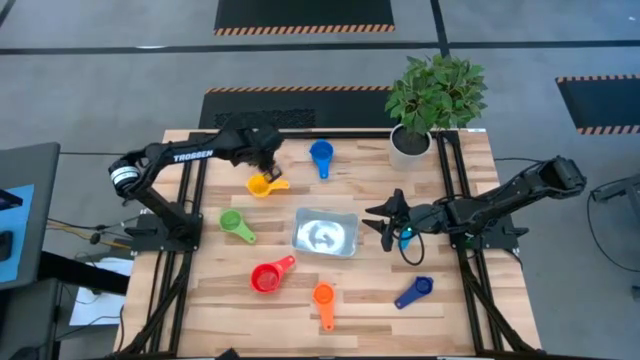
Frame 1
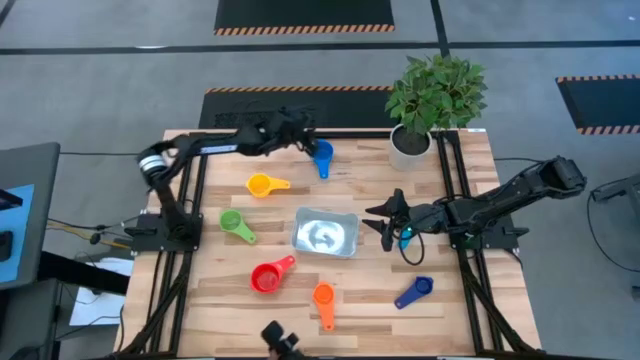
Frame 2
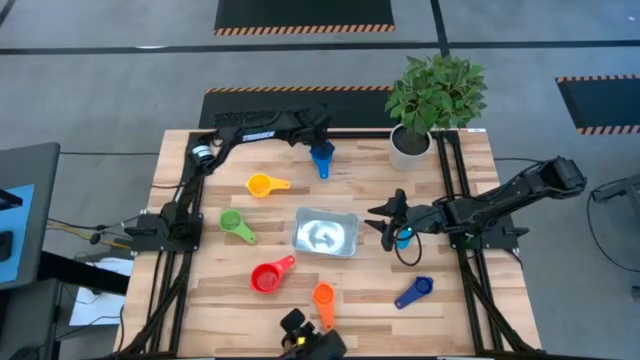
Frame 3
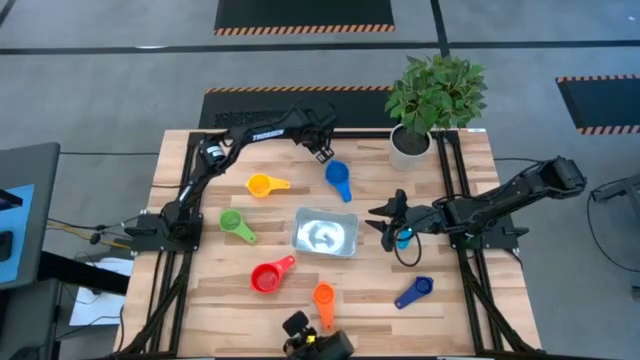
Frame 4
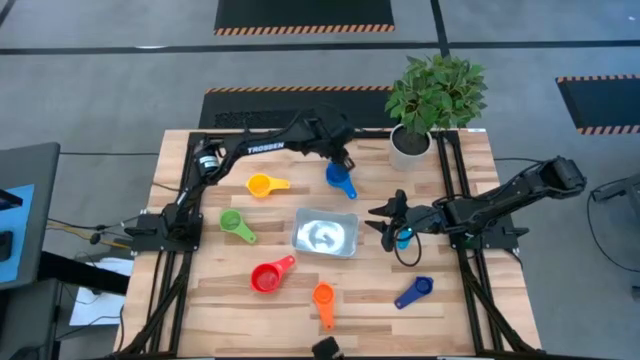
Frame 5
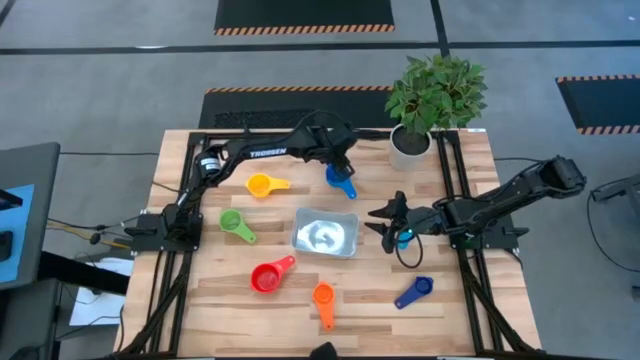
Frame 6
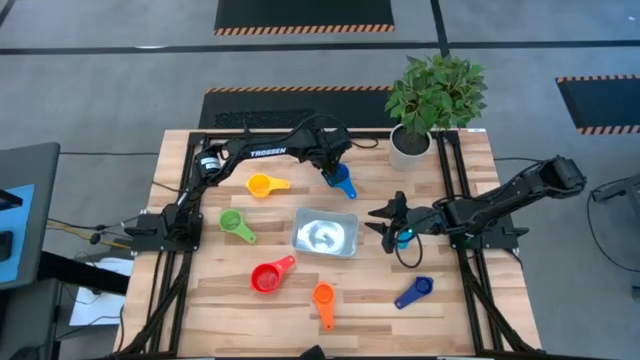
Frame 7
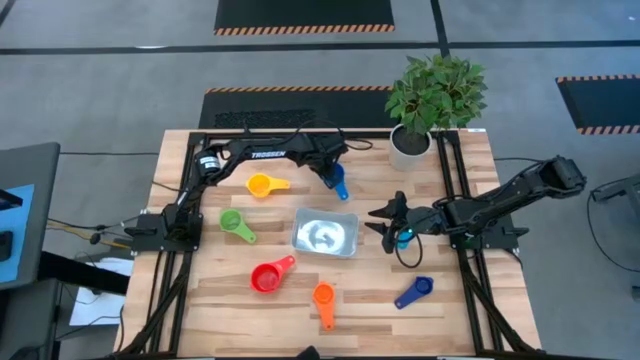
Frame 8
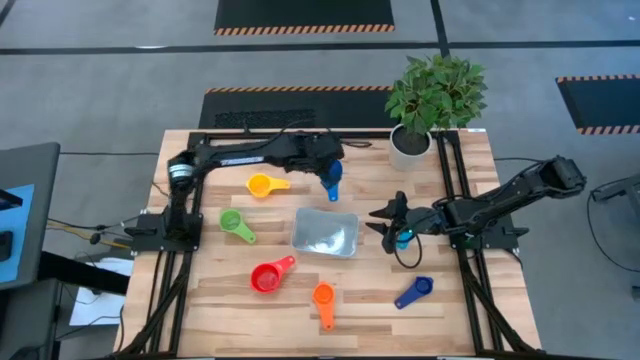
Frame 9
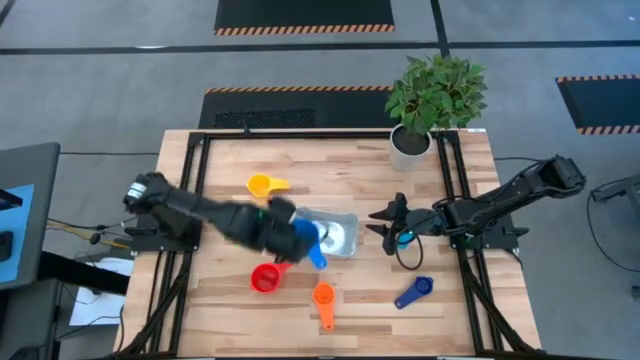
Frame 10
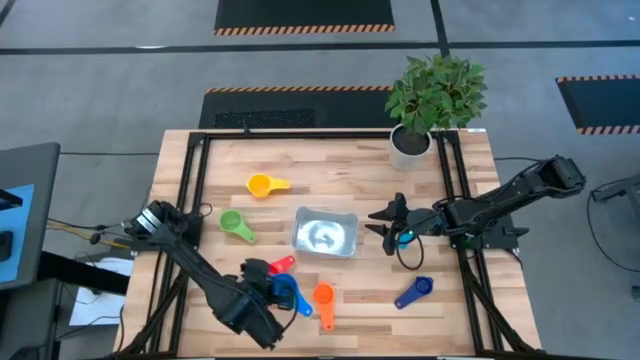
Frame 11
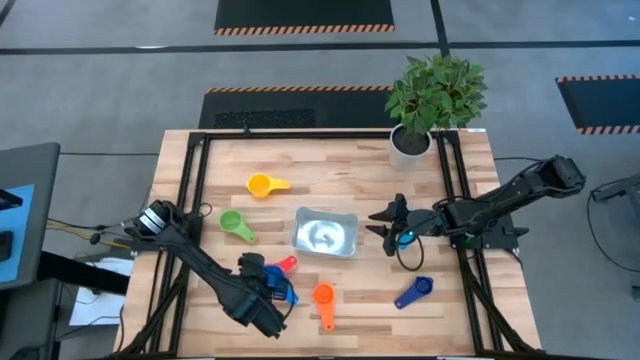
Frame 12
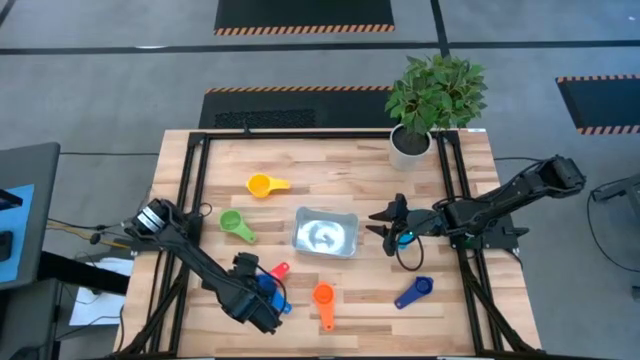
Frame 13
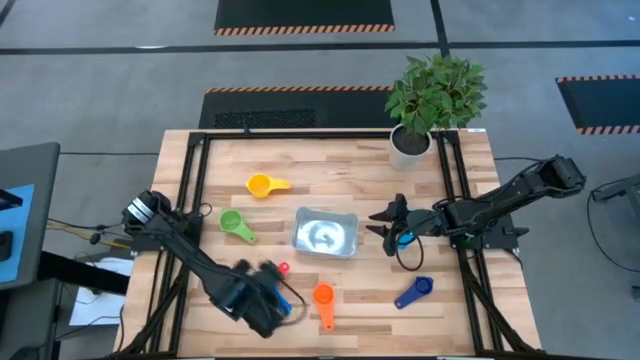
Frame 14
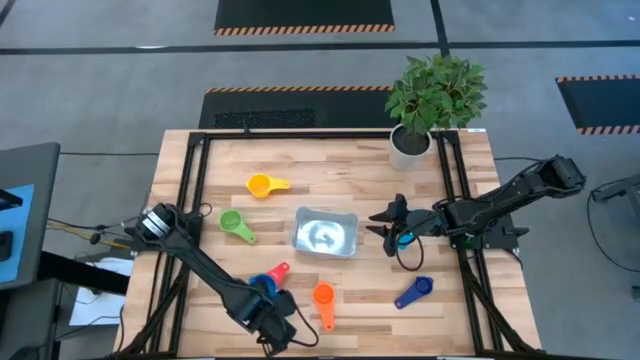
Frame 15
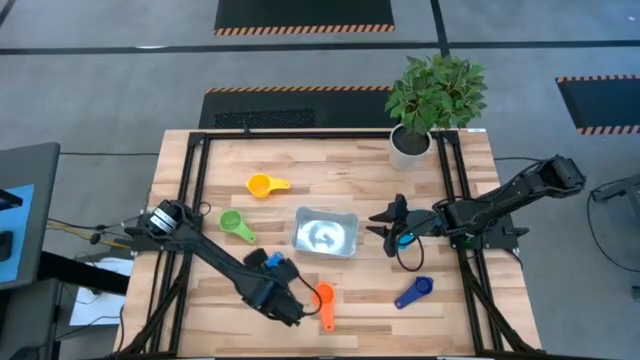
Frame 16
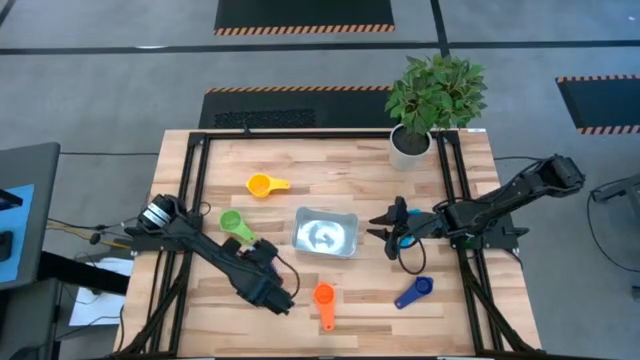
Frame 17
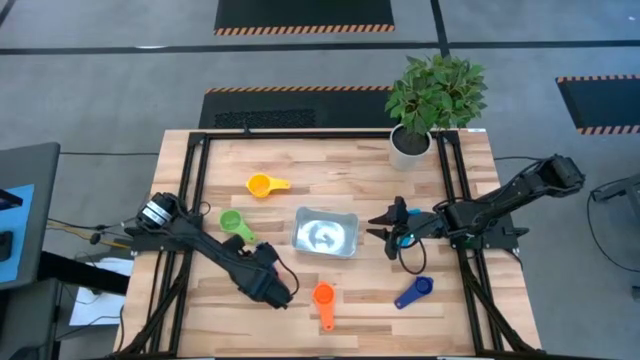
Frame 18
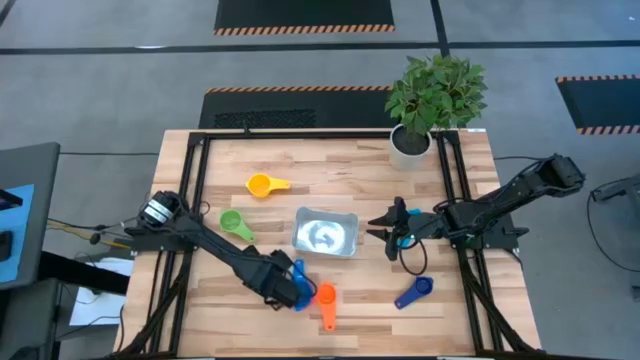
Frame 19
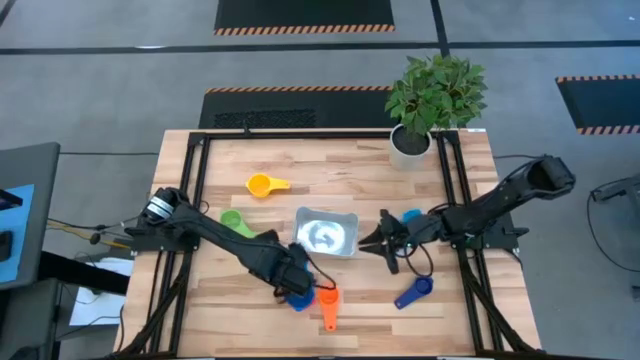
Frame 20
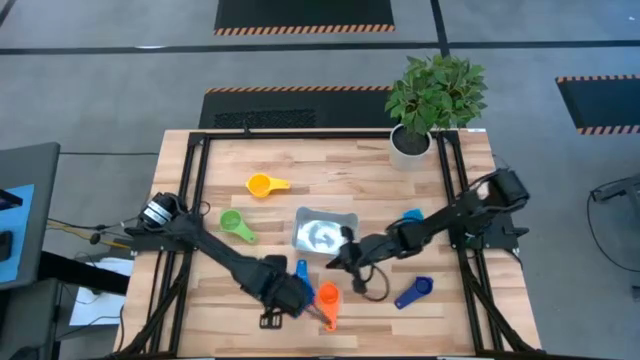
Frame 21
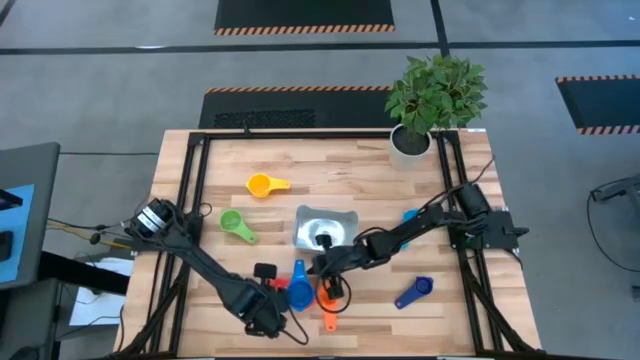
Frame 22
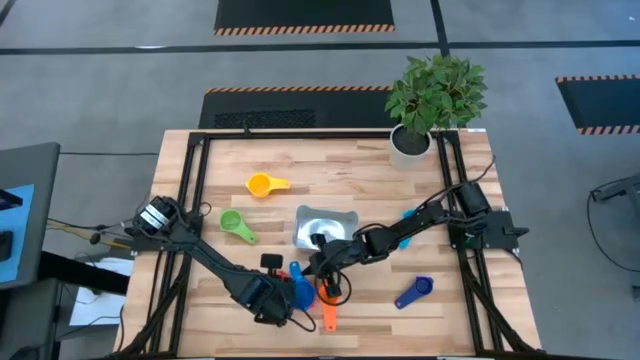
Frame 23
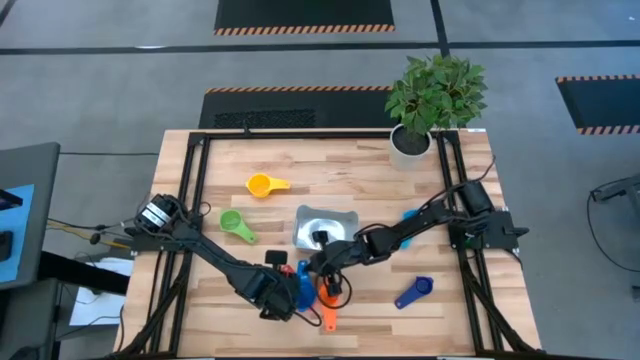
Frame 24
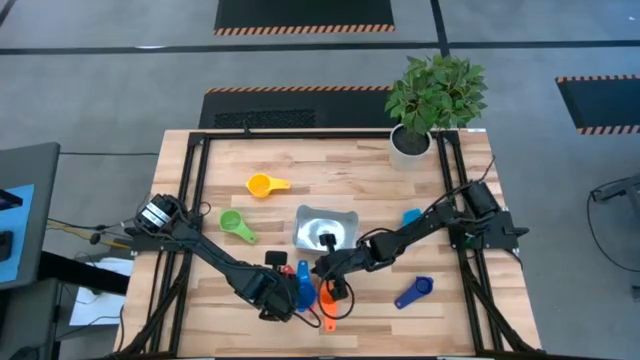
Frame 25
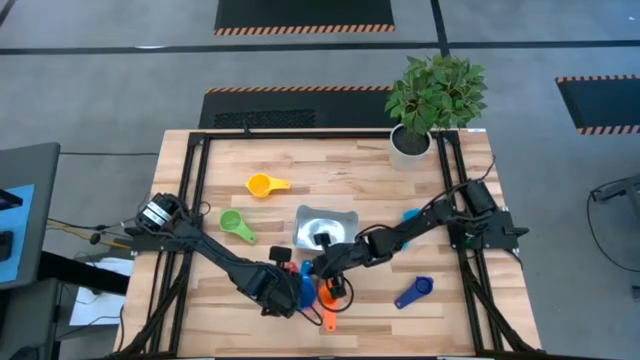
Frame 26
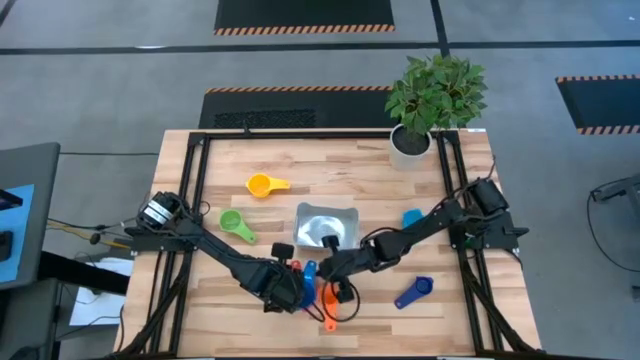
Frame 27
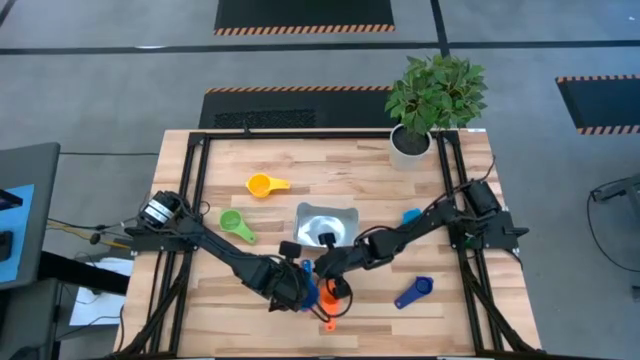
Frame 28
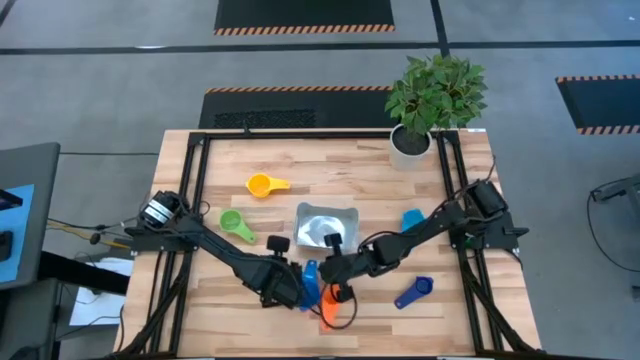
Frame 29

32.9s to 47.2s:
Task: Nest measuring cups in basket
Stack the blue measuring cup on top of the red measuring cup

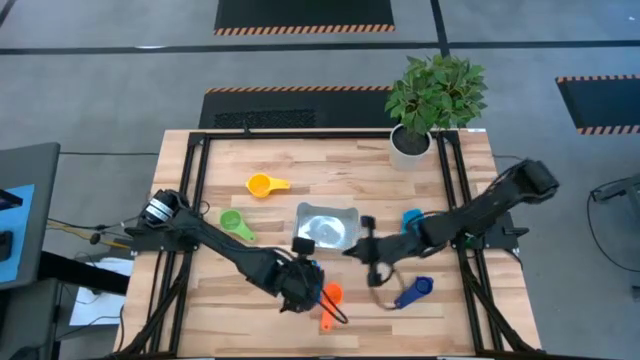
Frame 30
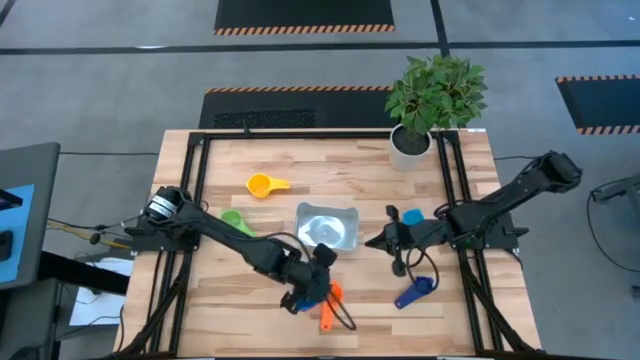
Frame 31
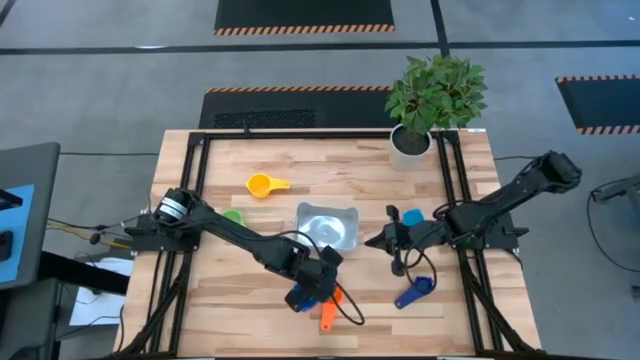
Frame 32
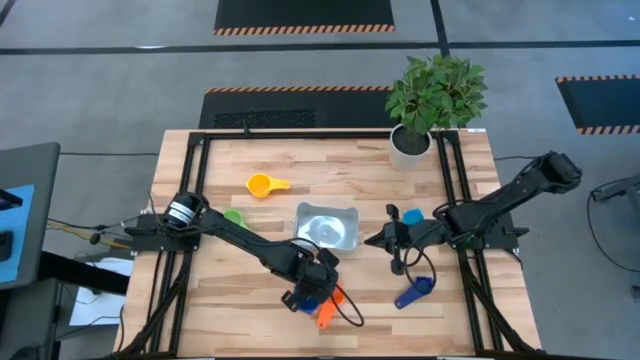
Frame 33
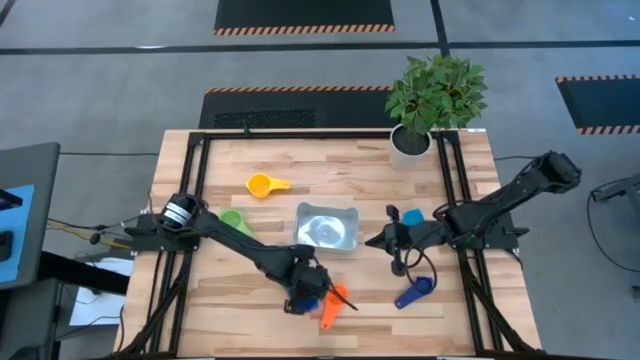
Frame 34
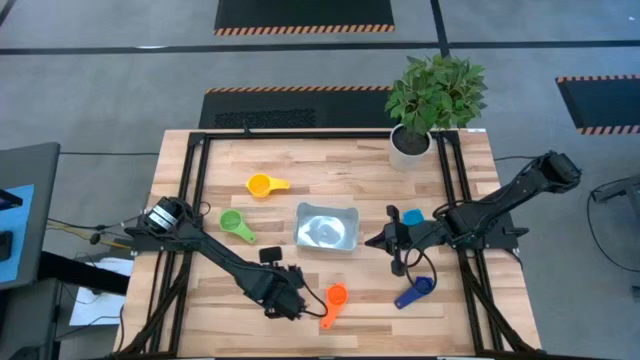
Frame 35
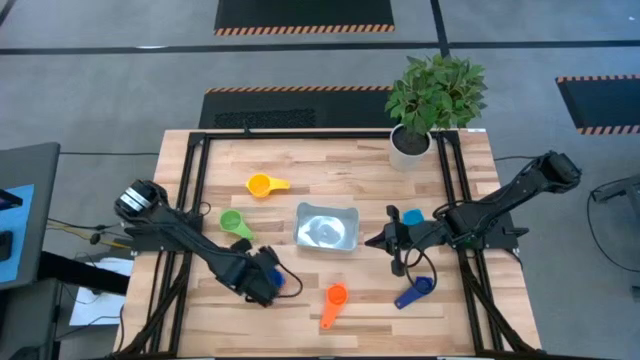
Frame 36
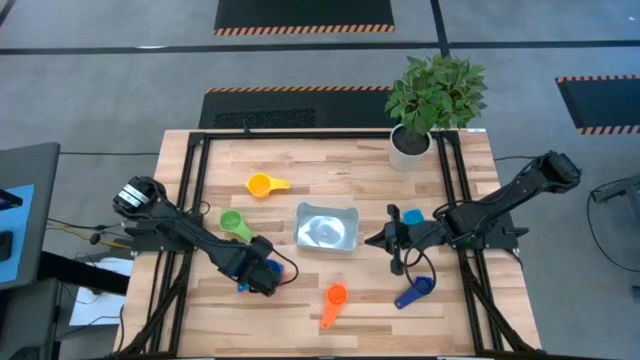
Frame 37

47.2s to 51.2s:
Adjust the stacked measuring cups

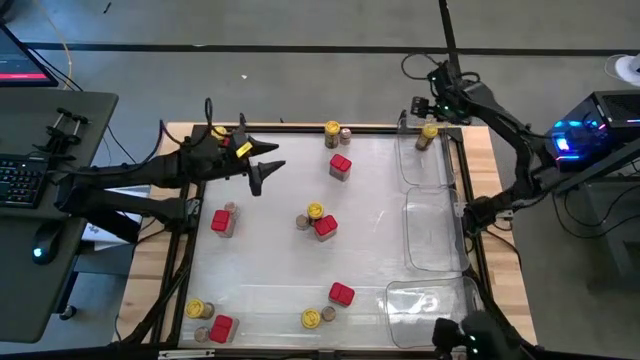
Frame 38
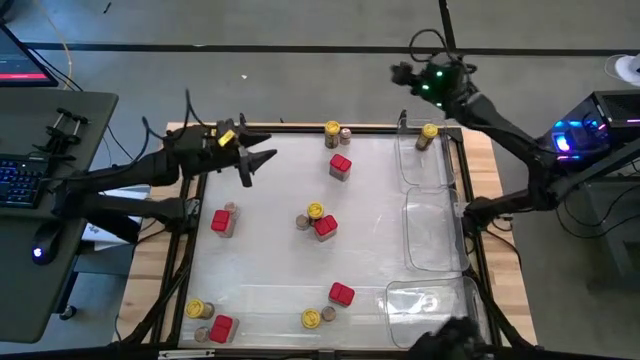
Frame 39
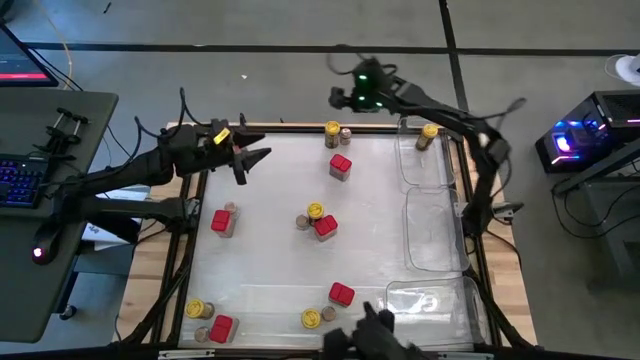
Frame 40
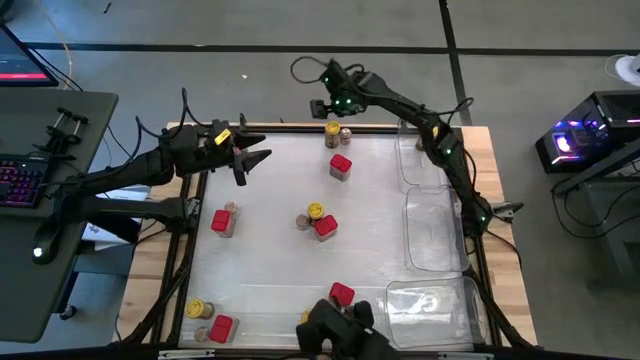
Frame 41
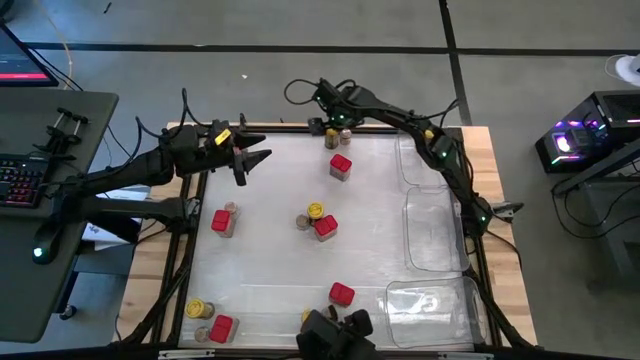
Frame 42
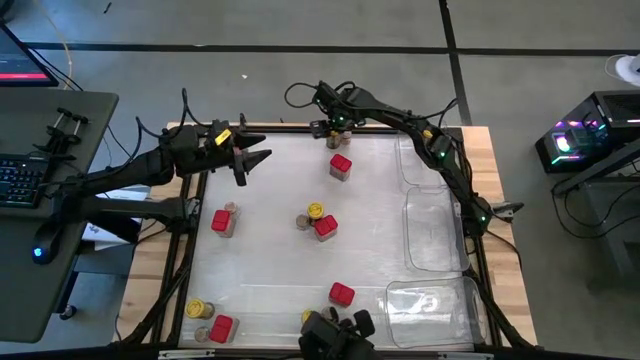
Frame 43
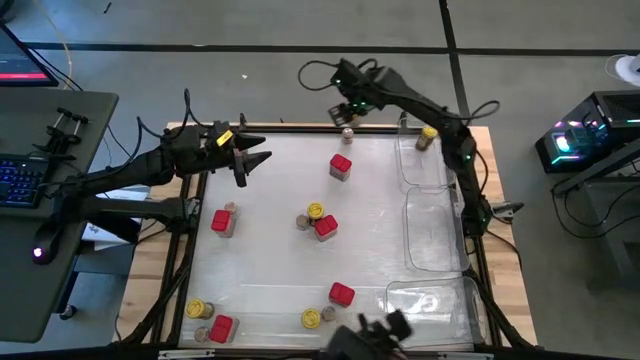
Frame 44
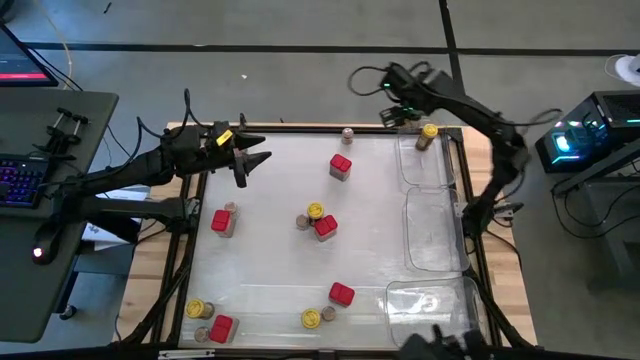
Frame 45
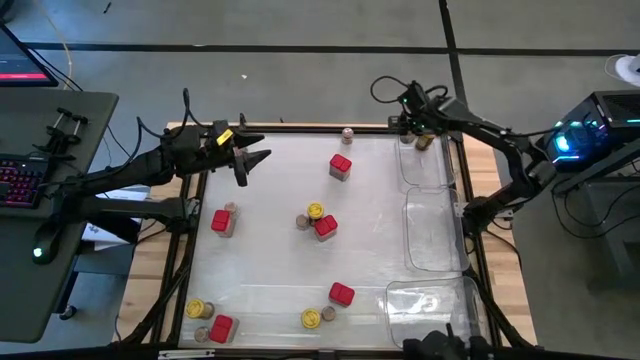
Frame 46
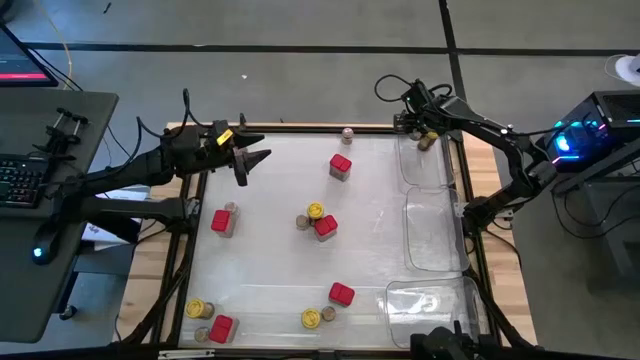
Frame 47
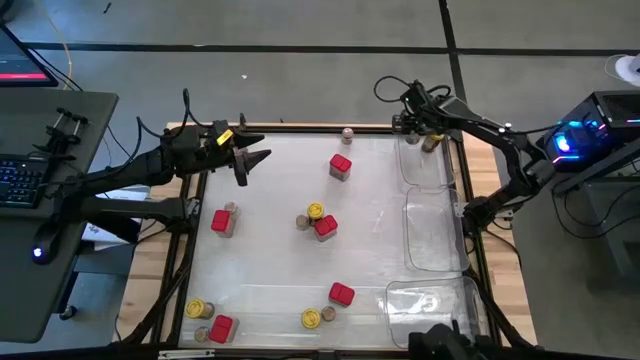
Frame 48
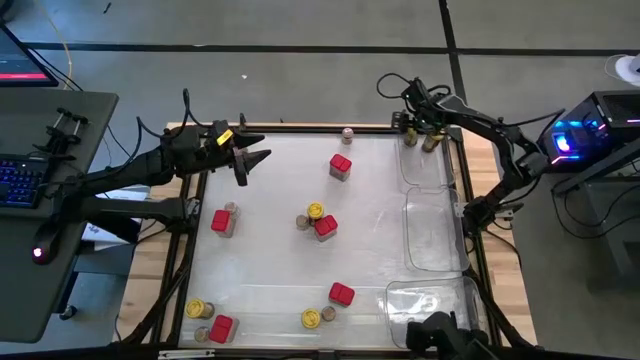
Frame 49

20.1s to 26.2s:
Task: Sort spices by type
Put the yellow seasoning bottle into the top transparent bin
